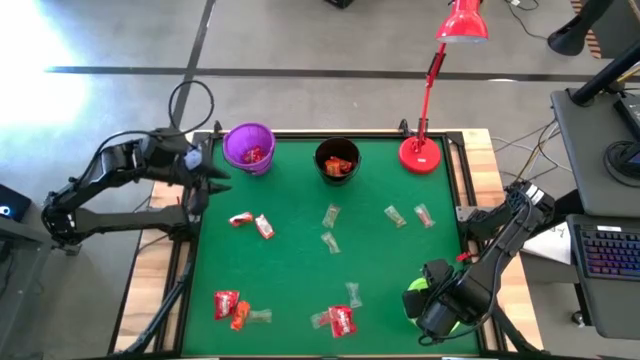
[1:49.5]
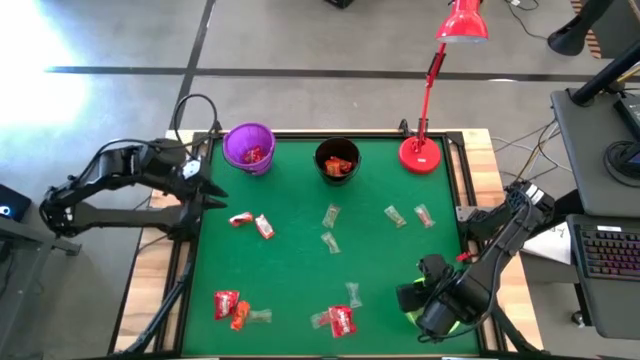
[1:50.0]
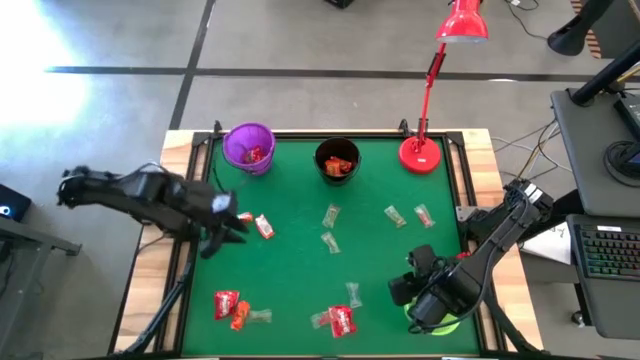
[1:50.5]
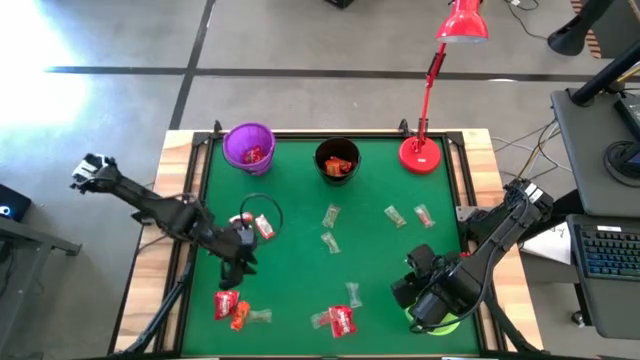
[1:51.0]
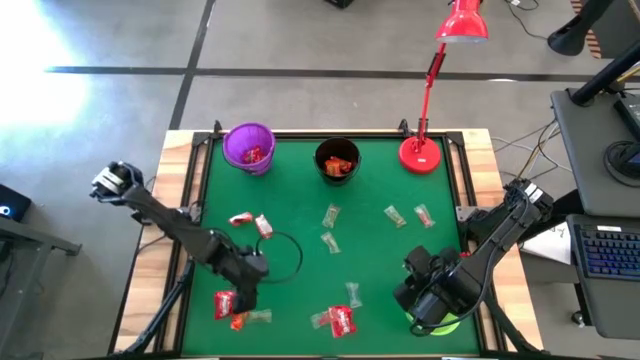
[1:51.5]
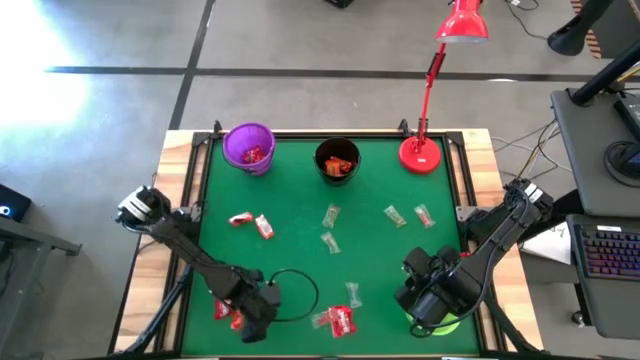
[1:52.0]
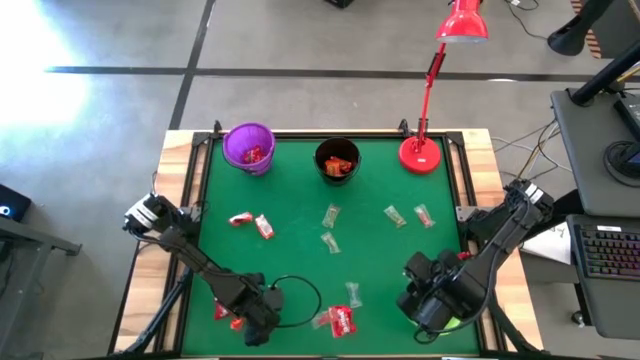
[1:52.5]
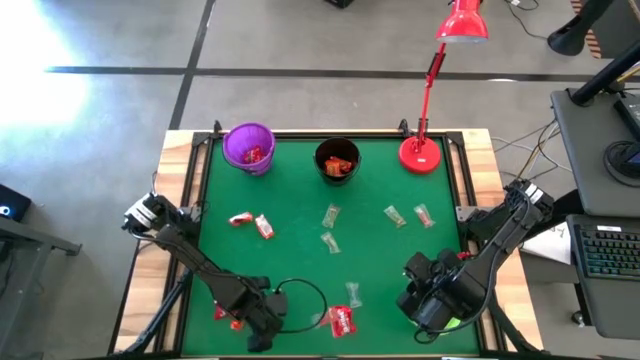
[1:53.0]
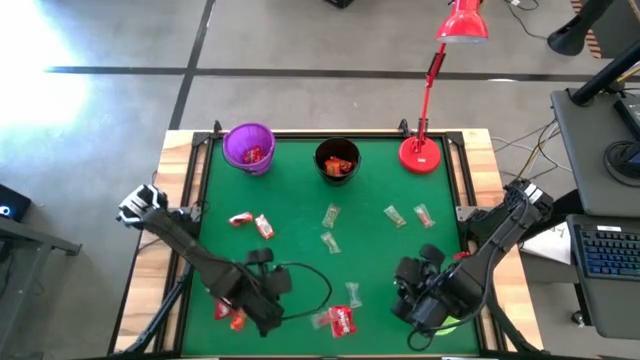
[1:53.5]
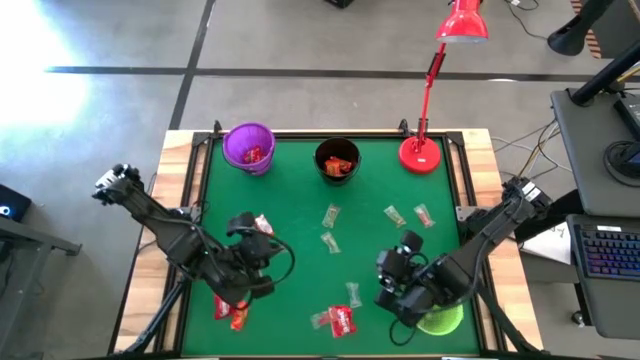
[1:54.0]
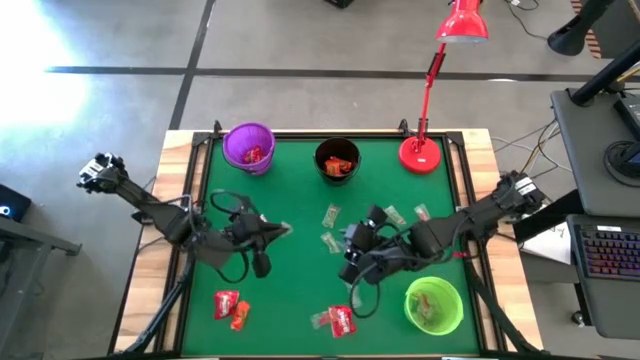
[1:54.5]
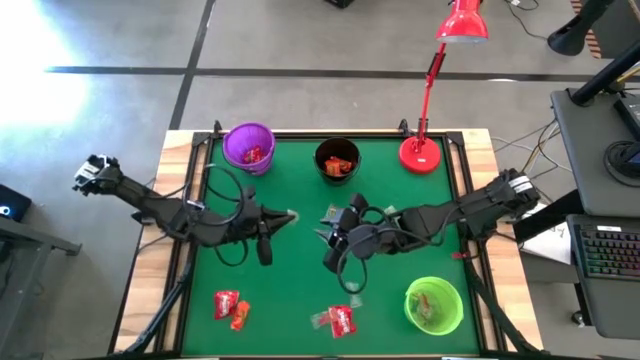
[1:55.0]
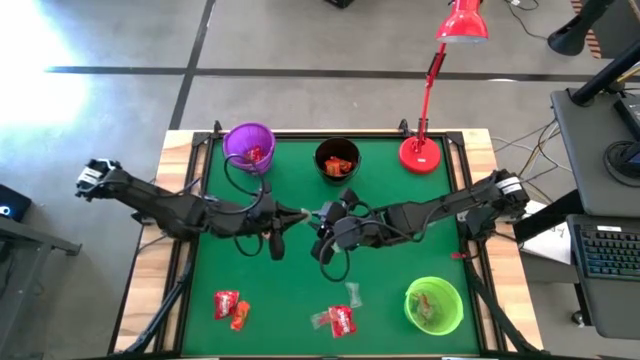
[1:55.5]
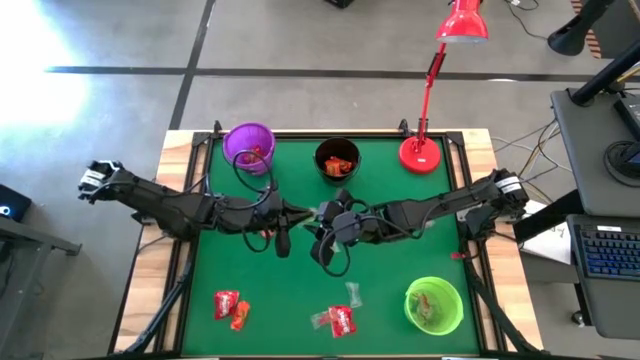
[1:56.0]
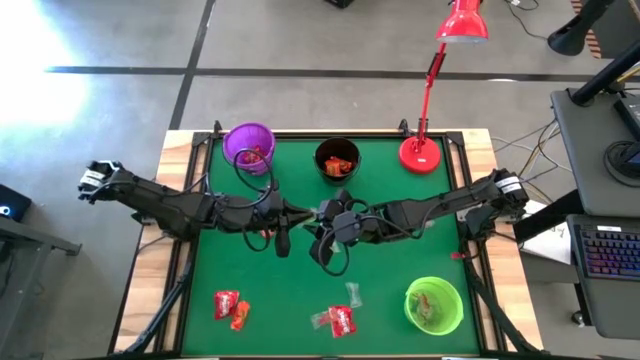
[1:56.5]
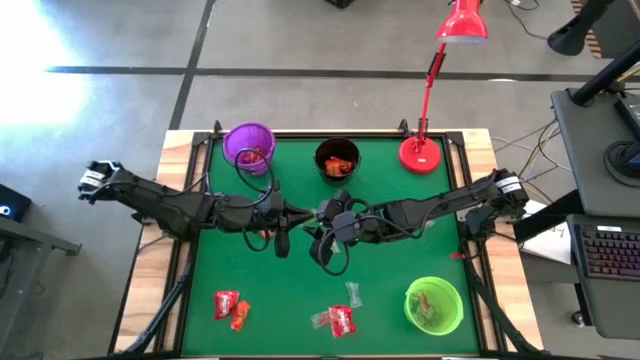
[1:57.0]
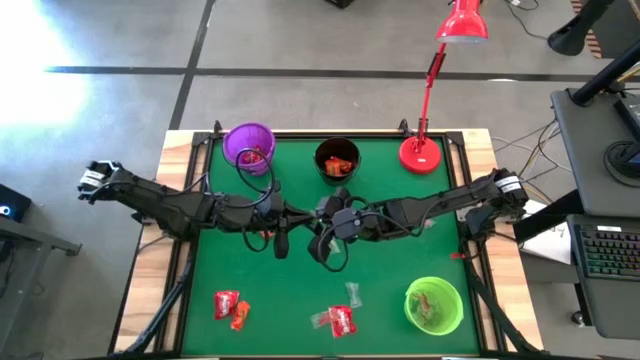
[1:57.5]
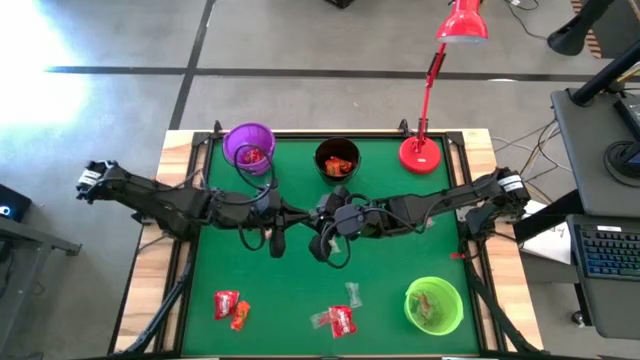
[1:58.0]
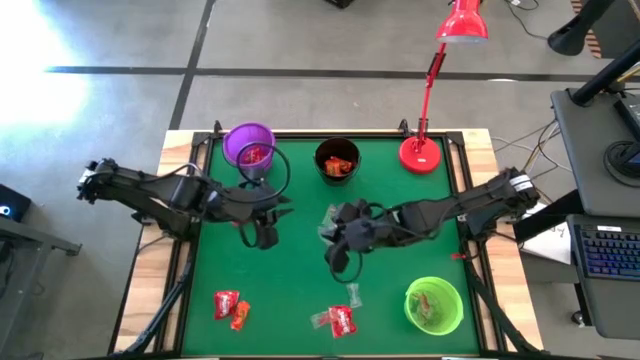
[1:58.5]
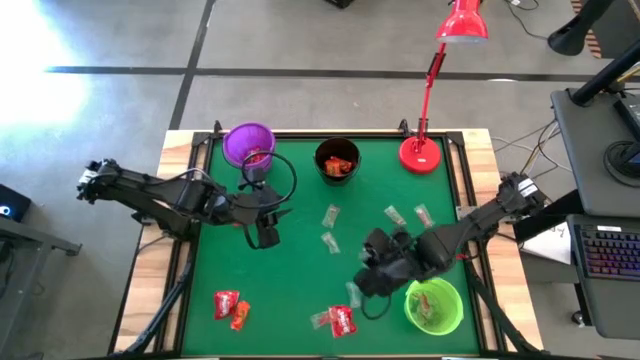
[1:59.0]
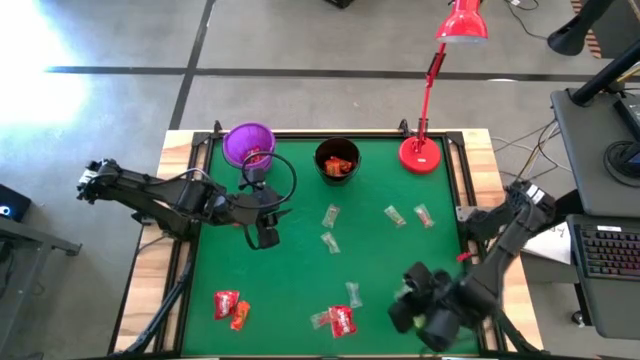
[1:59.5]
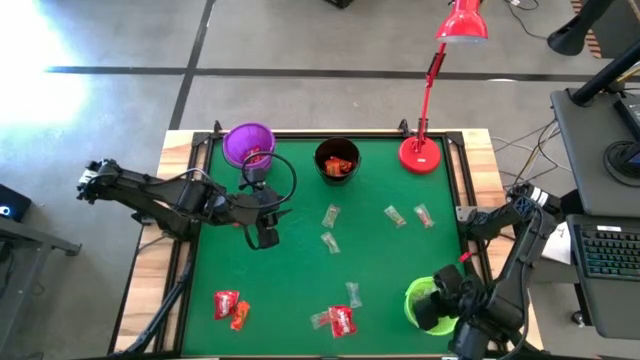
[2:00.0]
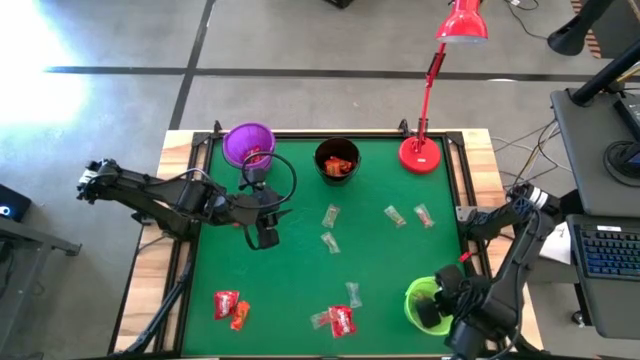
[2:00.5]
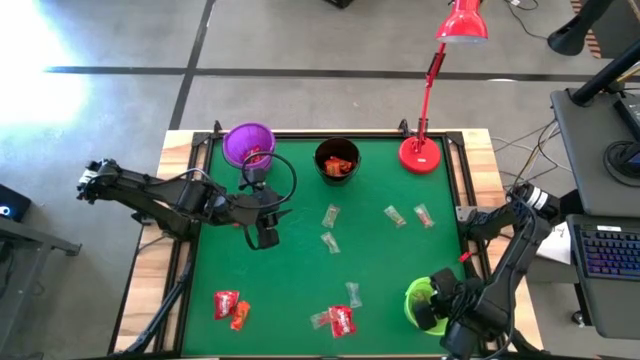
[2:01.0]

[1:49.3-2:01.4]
Task: Sort candy
Put the green gummy into the green bucket

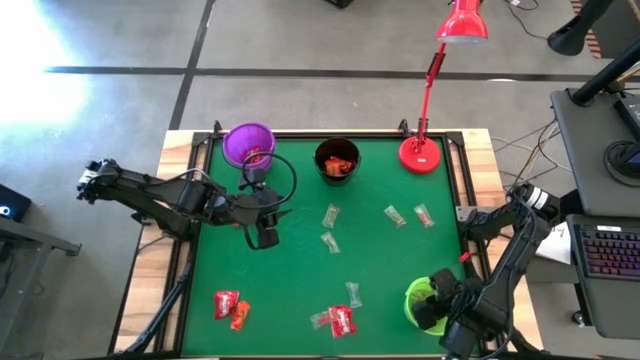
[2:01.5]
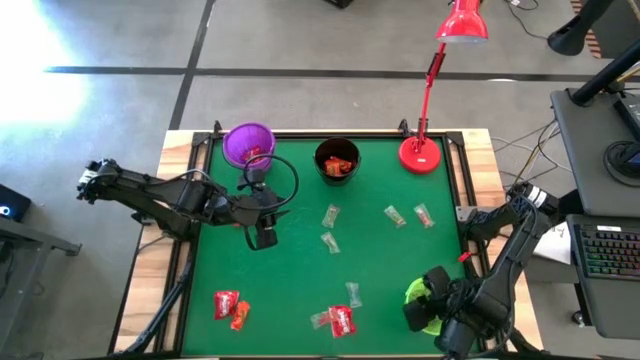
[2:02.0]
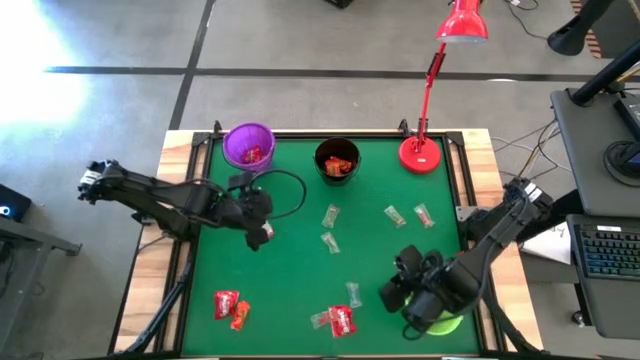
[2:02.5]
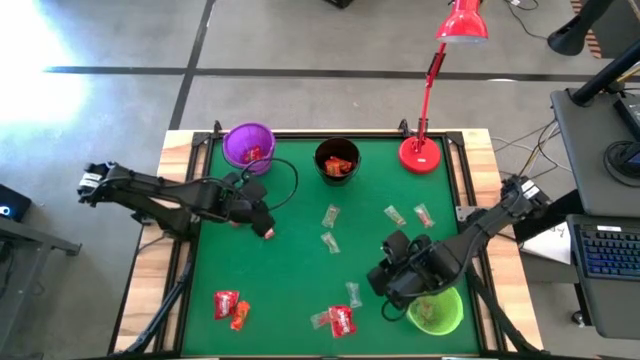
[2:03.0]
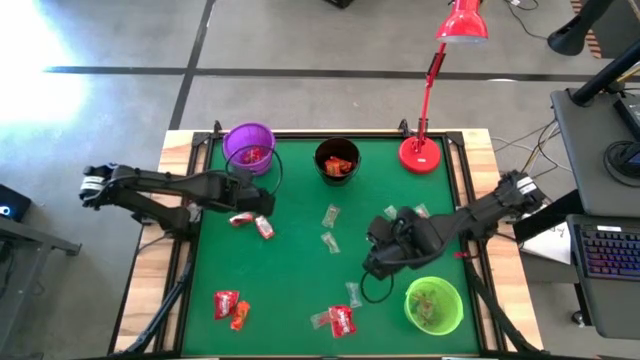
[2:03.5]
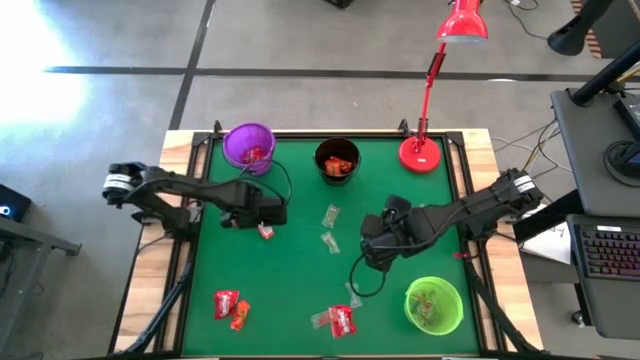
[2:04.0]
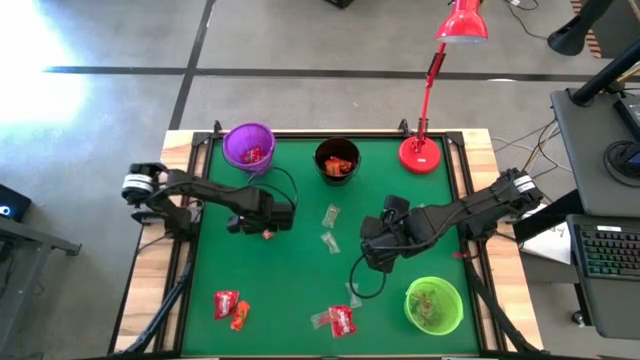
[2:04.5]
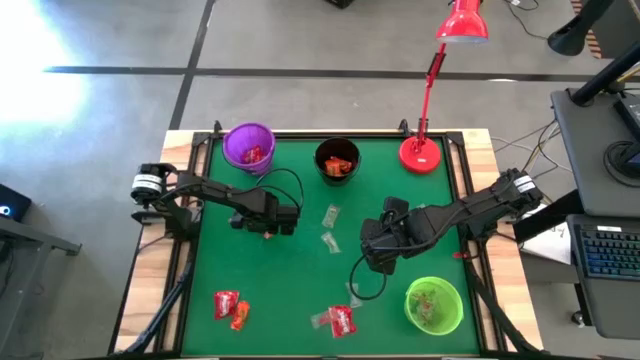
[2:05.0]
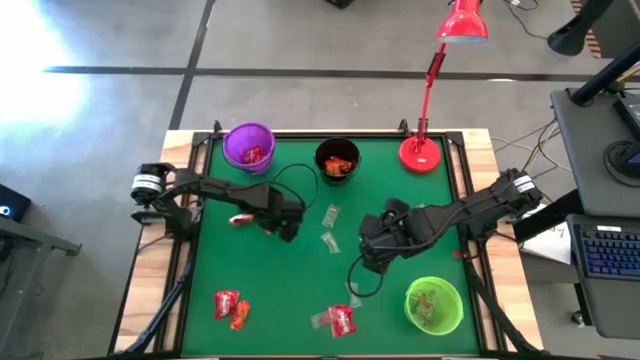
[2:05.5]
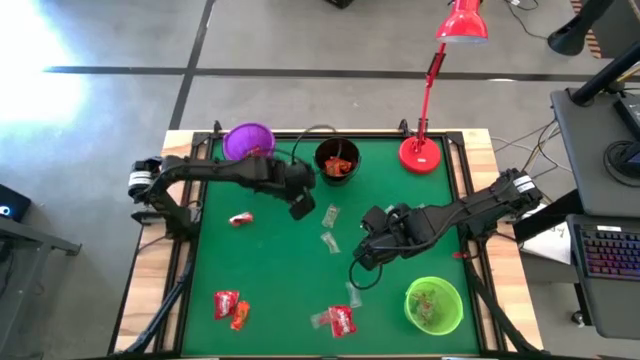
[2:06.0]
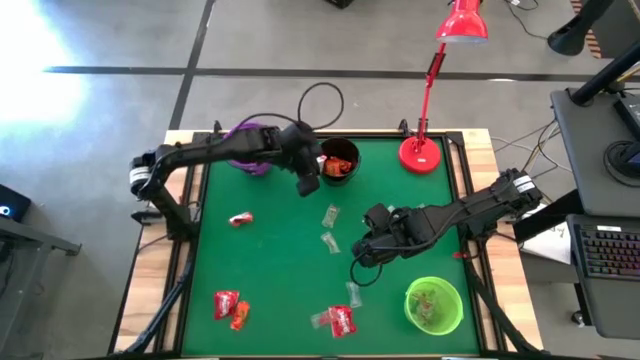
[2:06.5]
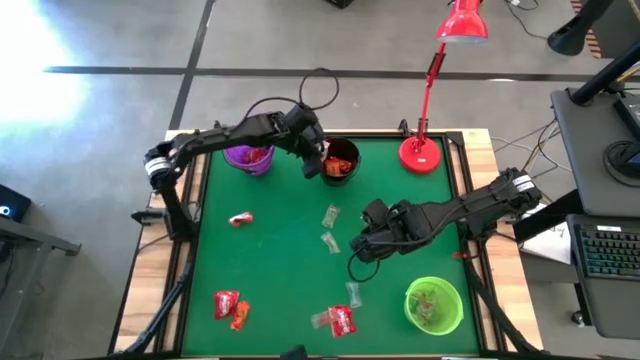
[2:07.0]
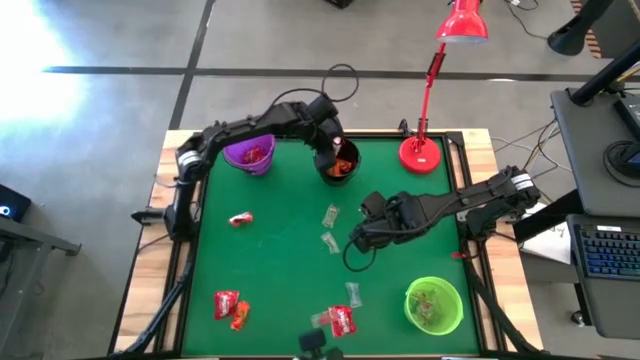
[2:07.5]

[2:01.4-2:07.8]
Put the orange candy into the black bucket

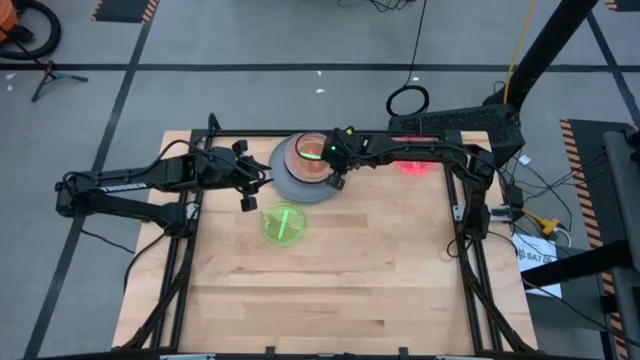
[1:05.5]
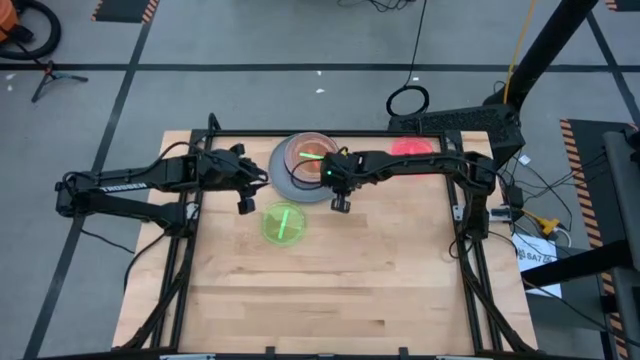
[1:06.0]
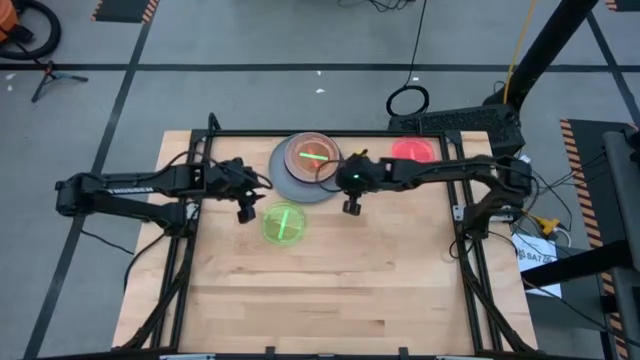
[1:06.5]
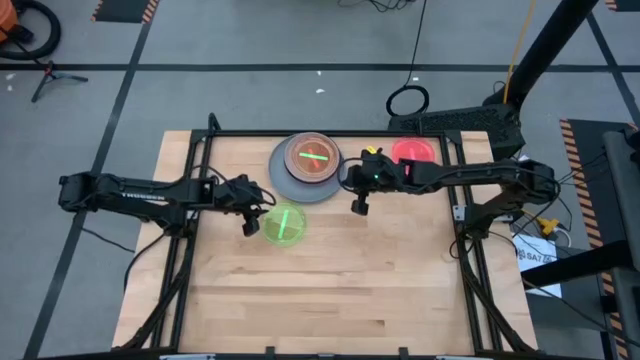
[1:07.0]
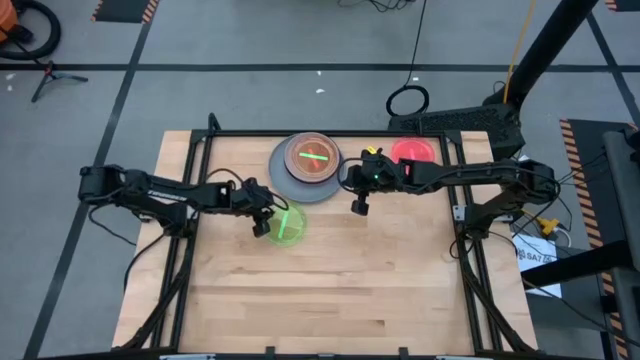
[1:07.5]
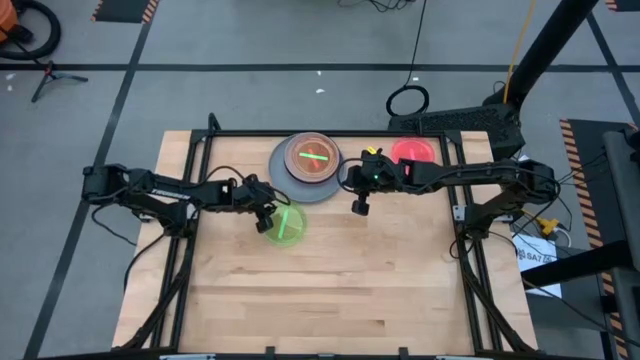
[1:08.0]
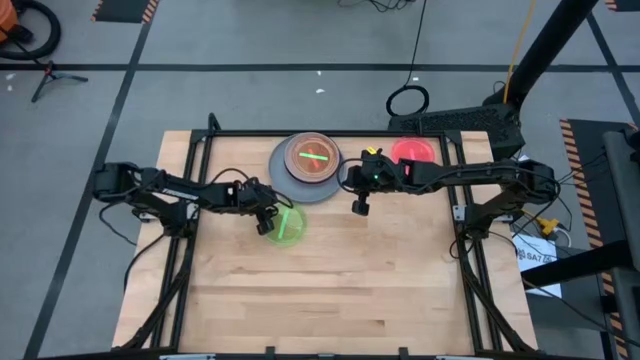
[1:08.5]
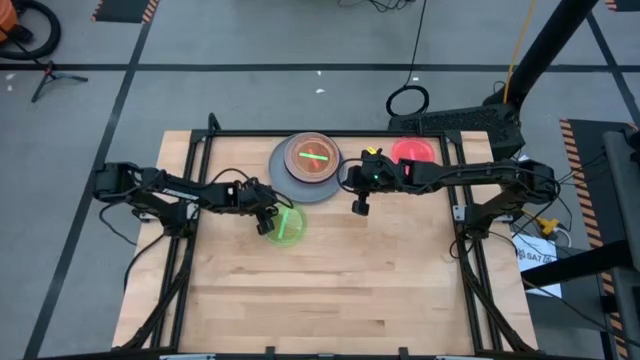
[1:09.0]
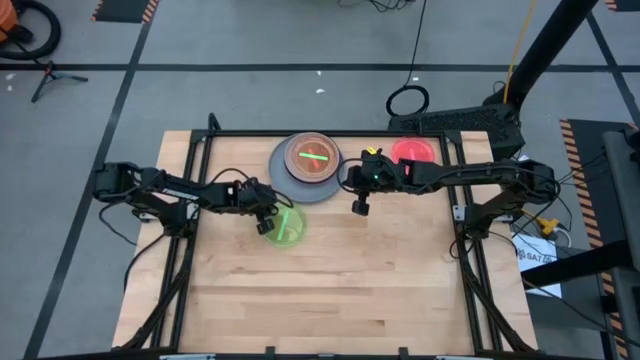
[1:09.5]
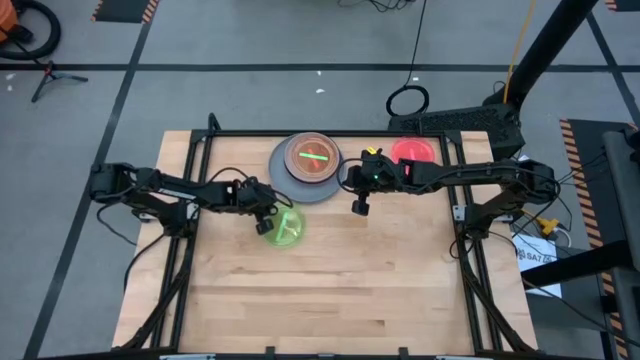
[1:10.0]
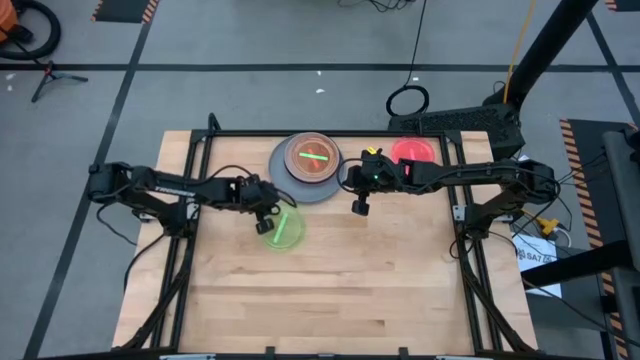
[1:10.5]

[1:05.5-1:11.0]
Task: Stack plastic plates
Stack the green plate on top of the other green plate
